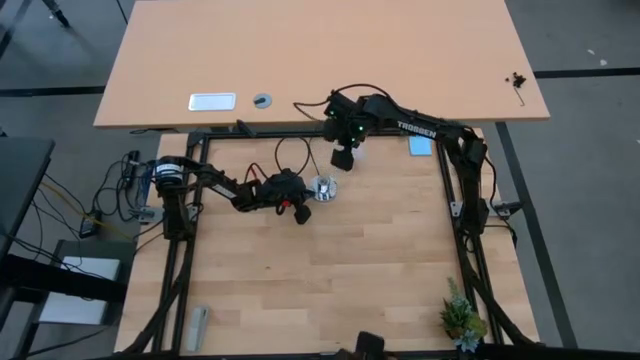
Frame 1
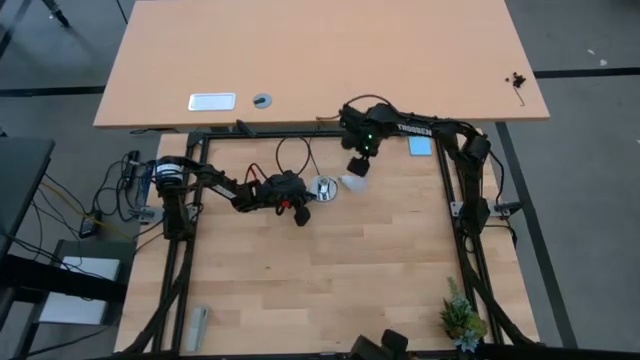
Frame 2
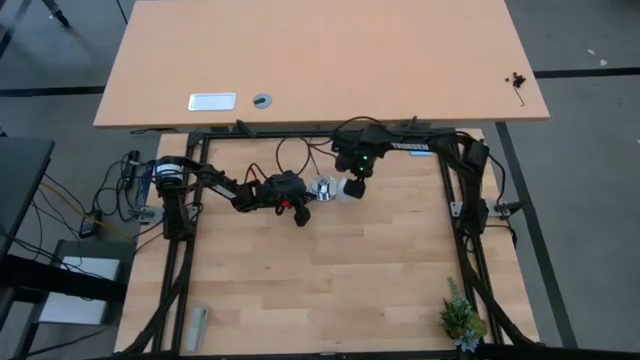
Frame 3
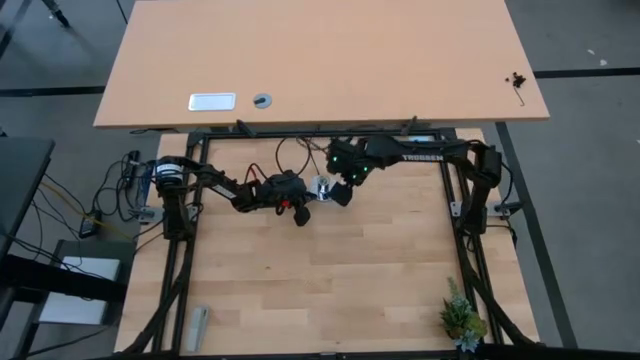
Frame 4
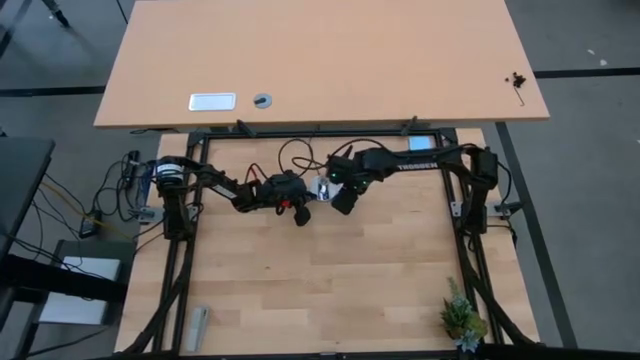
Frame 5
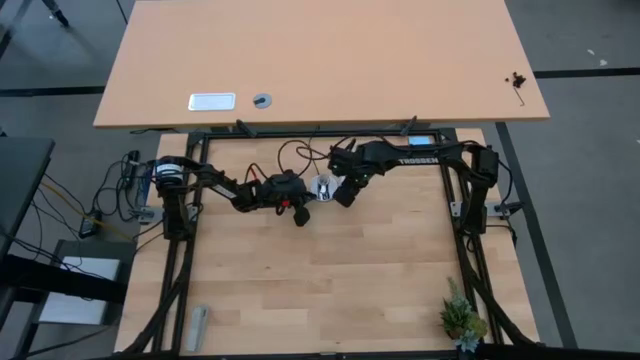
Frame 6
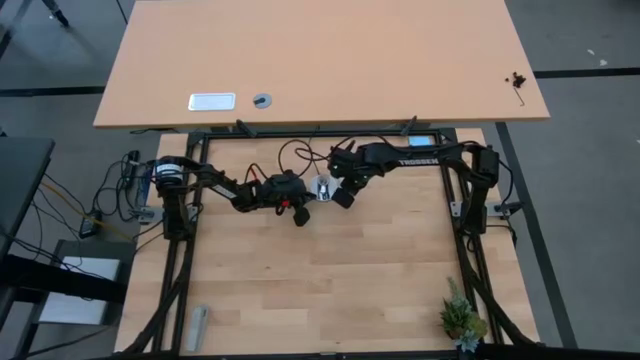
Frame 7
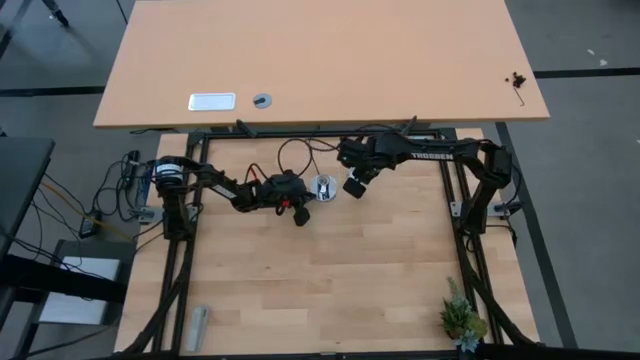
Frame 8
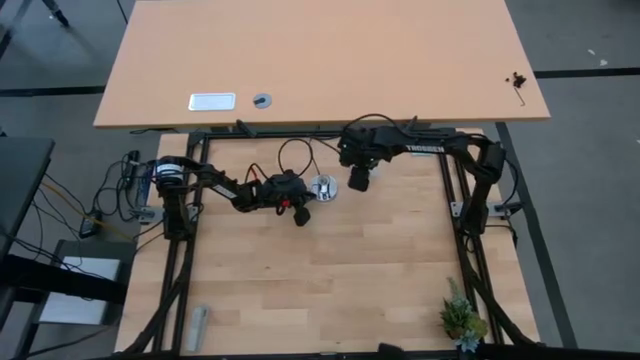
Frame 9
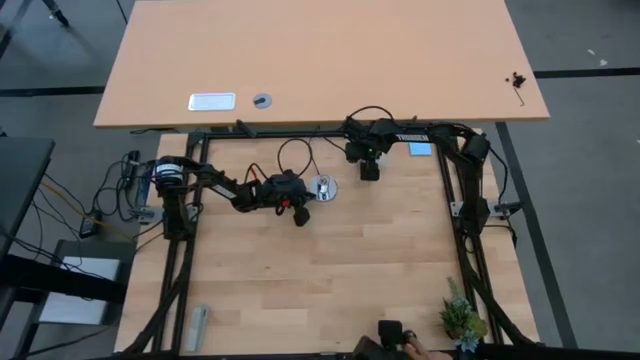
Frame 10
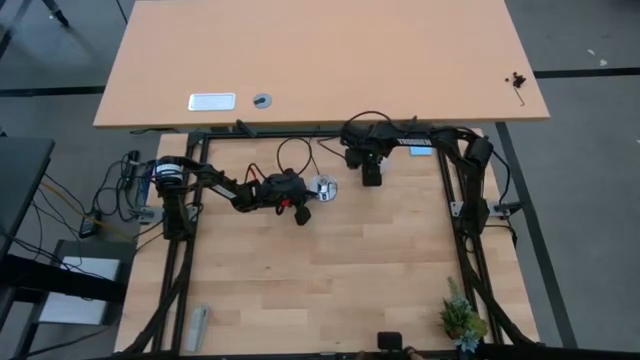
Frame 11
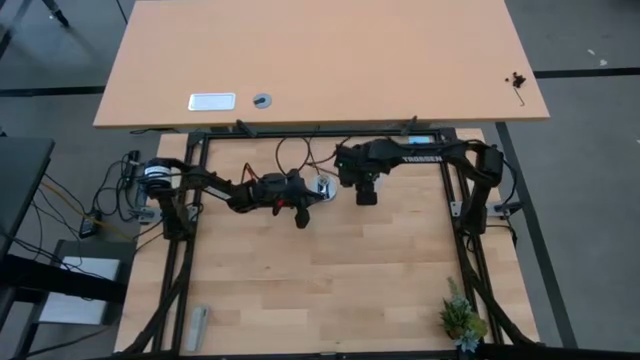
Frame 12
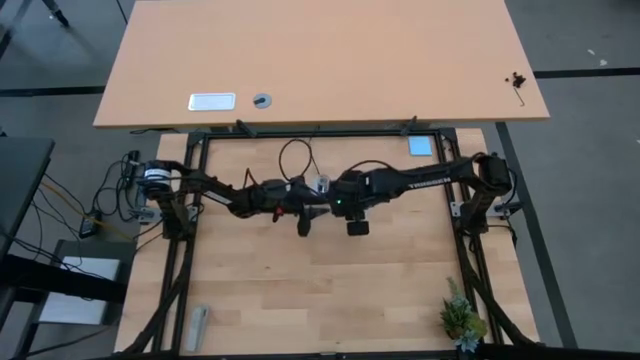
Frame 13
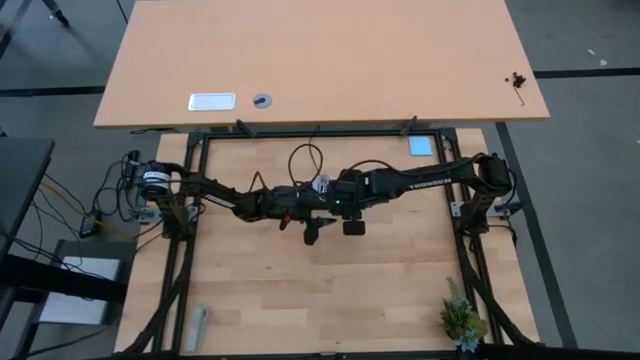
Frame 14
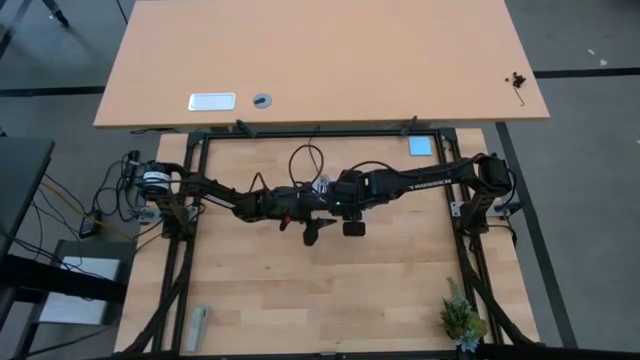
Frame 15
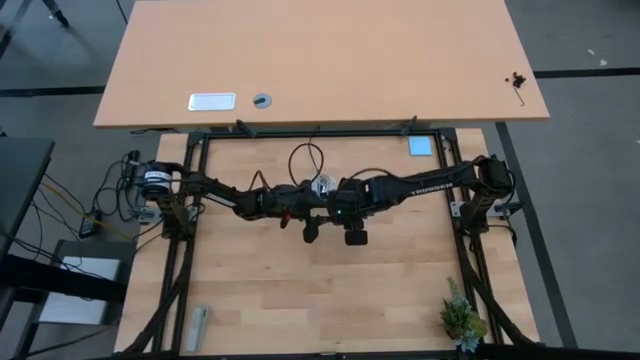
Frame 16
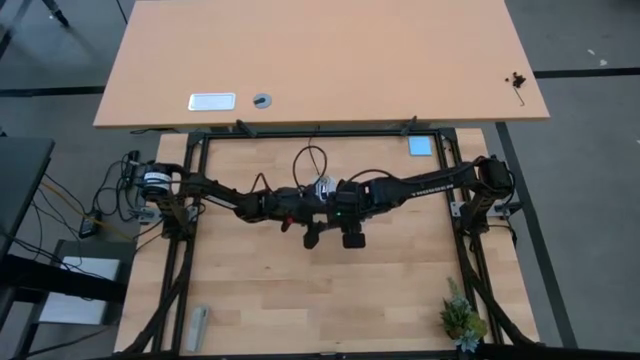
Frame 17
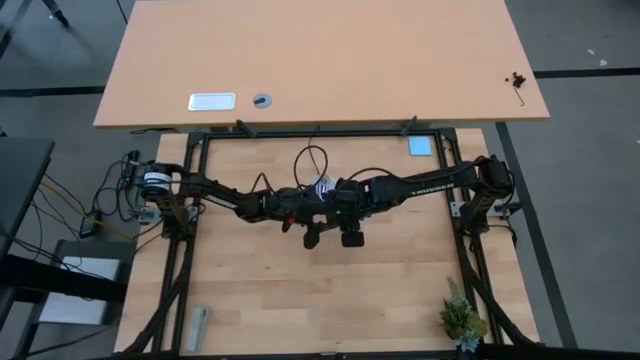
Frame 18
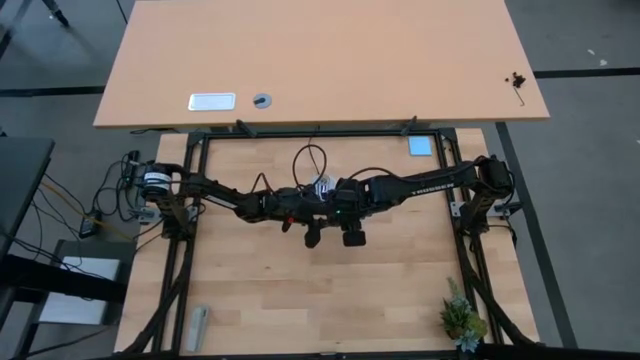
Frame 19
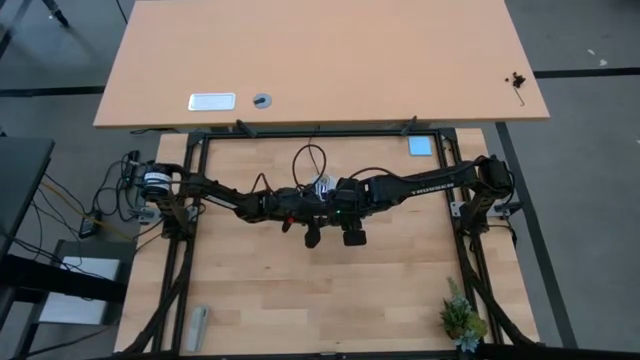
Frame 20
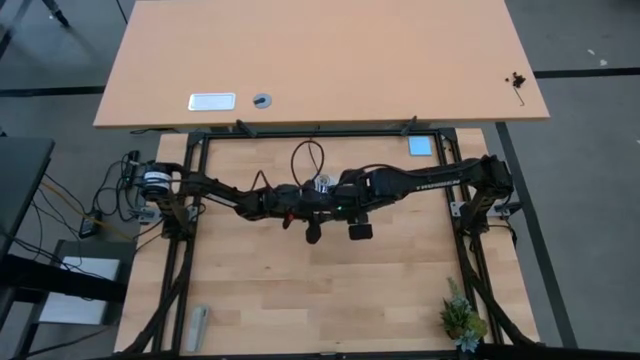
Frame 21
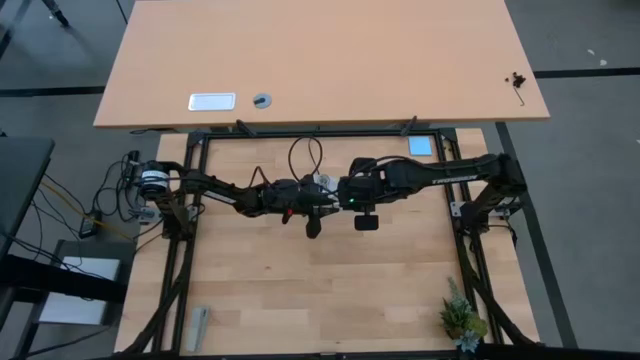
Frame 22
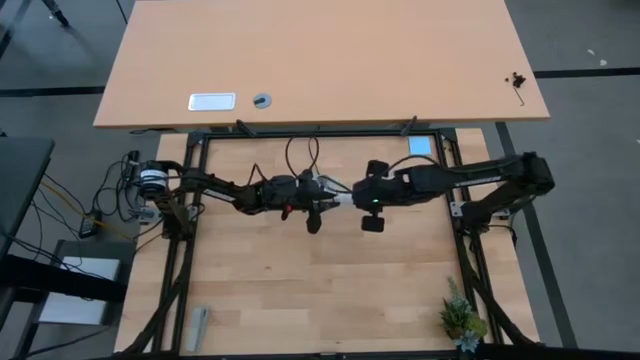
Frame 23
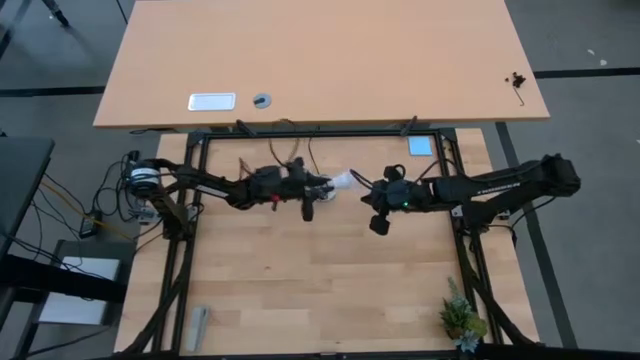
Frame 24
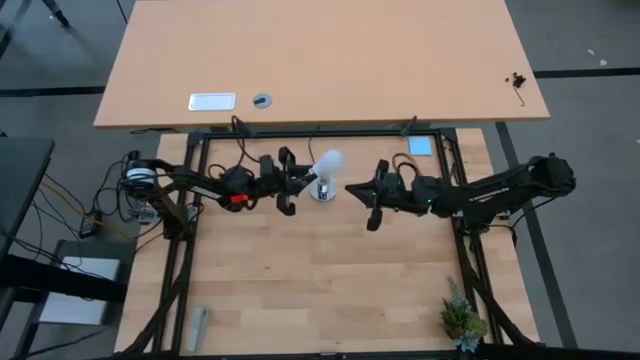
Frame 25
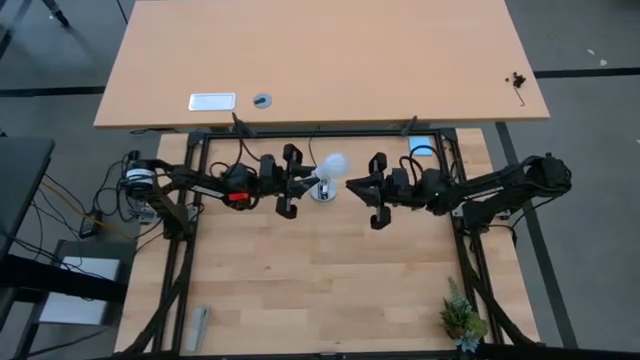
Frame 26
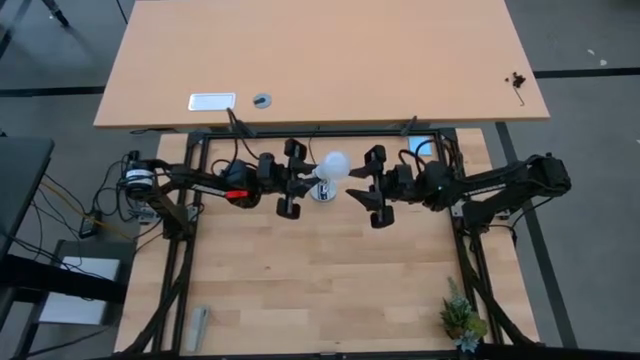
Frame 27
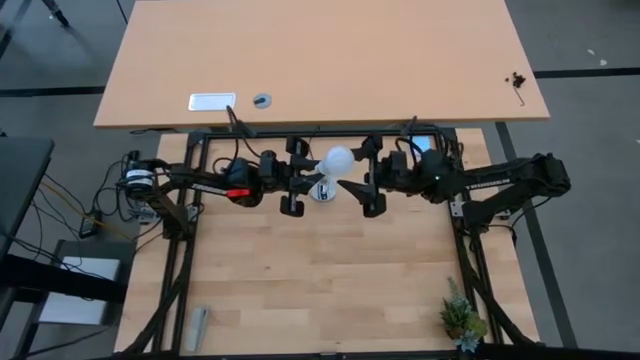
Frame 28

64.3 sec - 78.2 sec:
Task: Screw lightbulb
Insert the lightbulb into the lamp

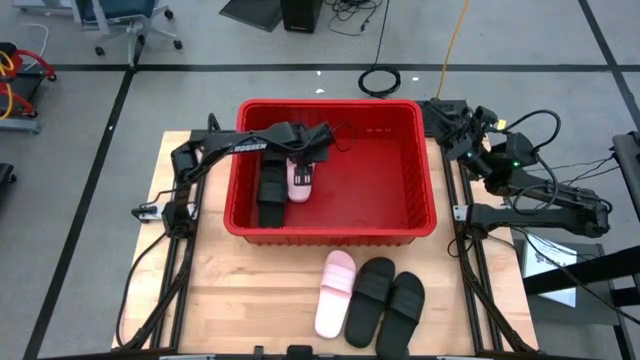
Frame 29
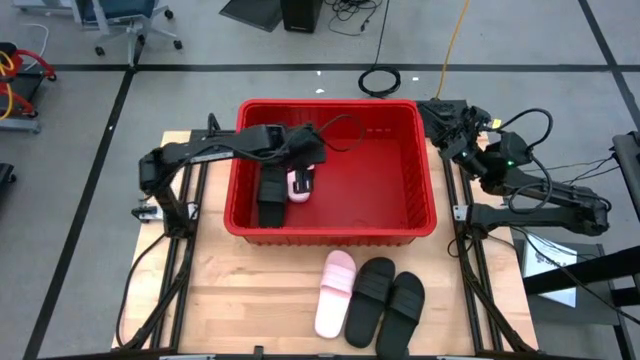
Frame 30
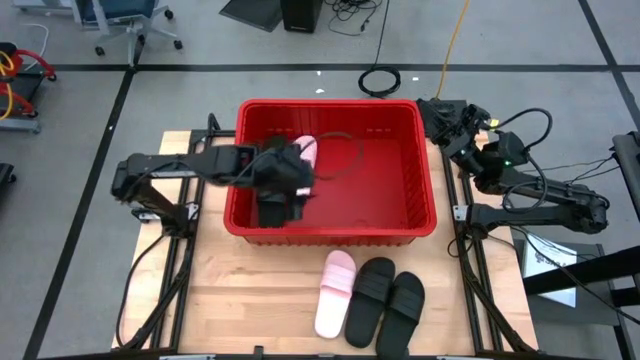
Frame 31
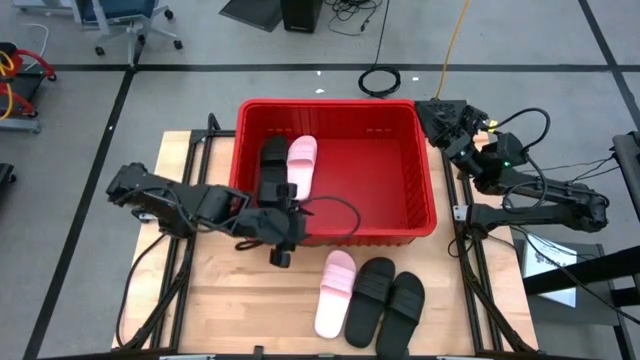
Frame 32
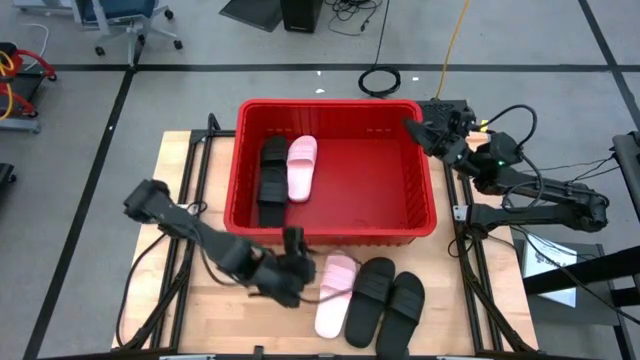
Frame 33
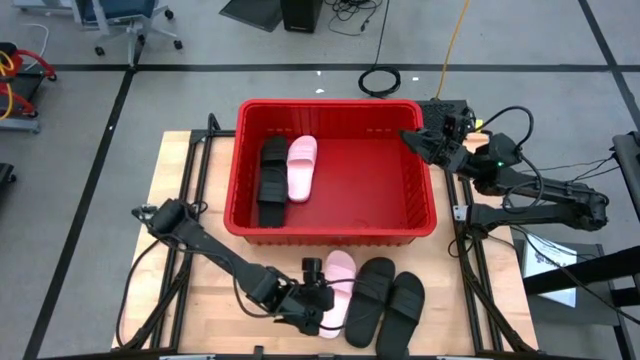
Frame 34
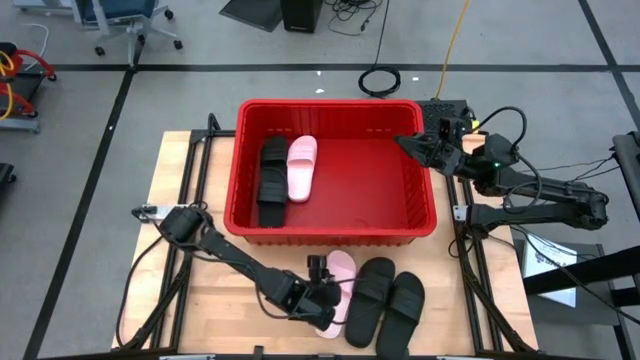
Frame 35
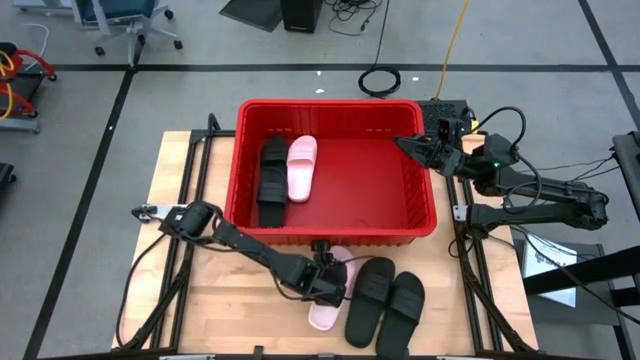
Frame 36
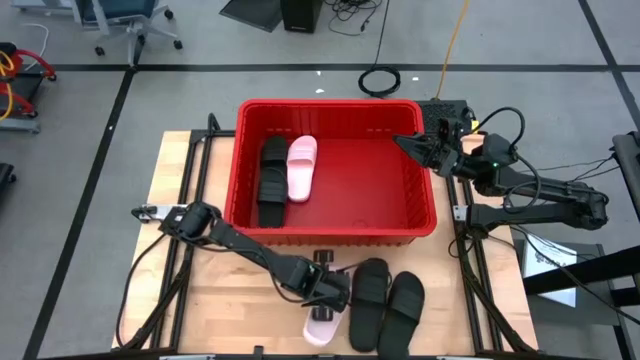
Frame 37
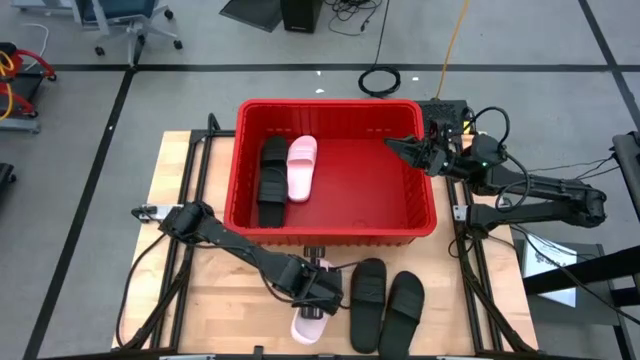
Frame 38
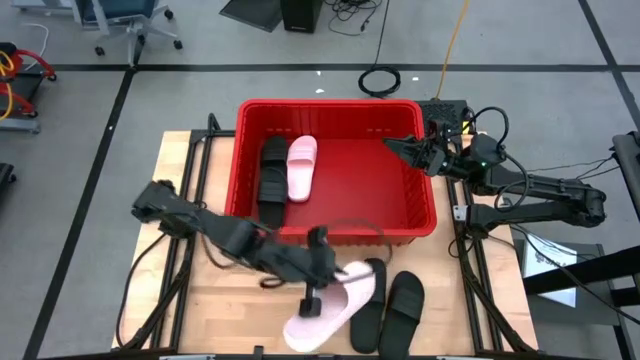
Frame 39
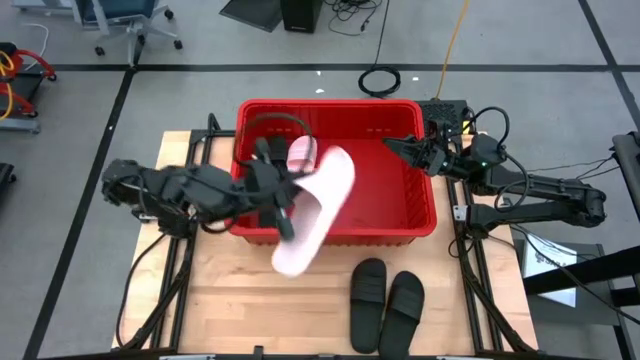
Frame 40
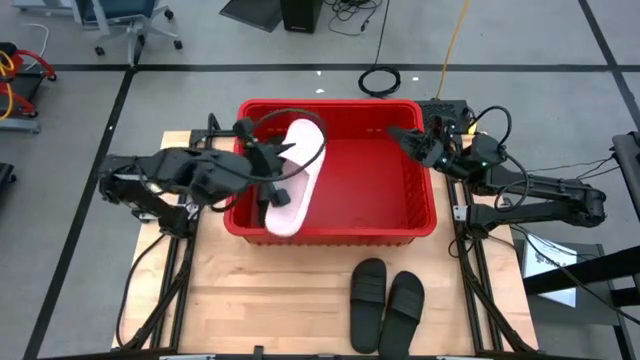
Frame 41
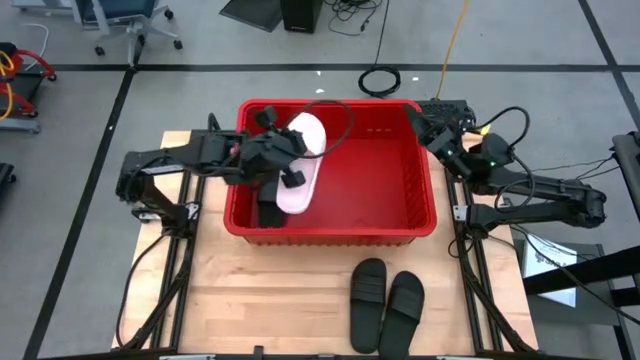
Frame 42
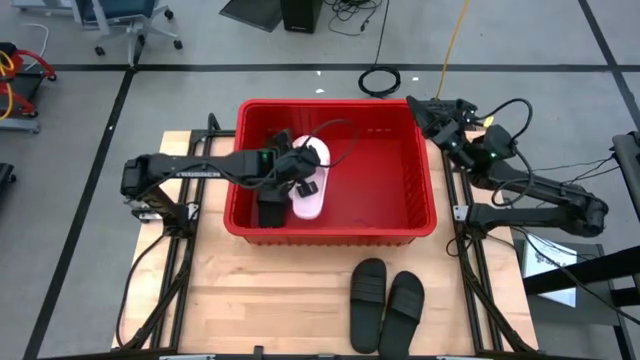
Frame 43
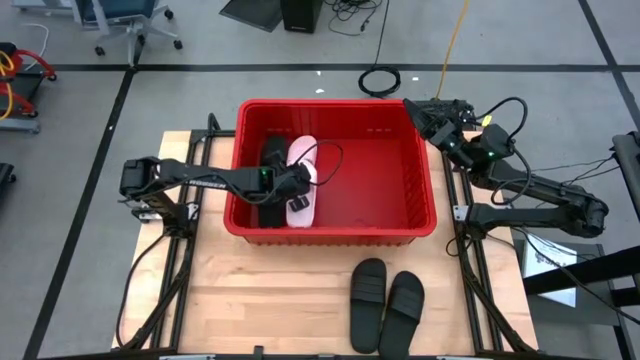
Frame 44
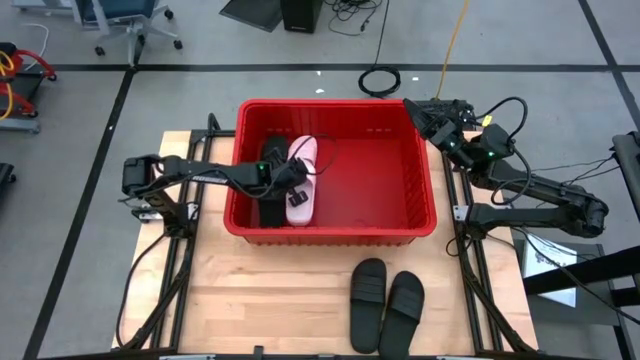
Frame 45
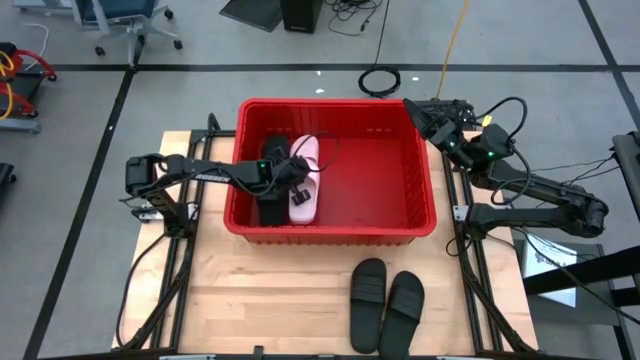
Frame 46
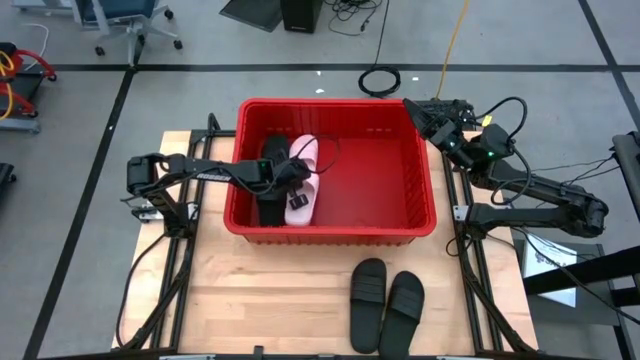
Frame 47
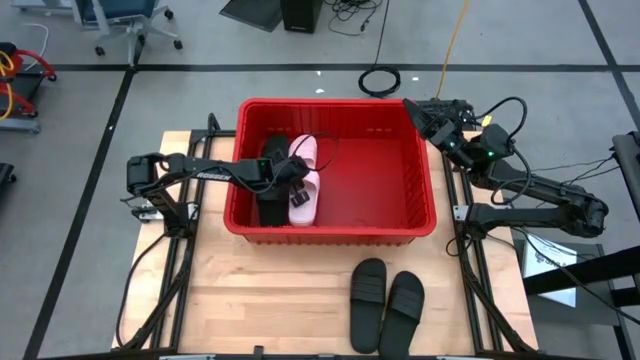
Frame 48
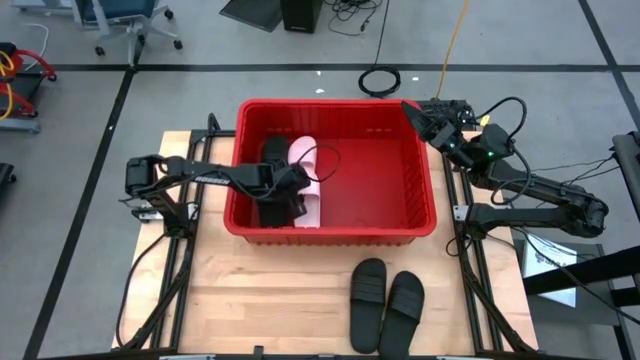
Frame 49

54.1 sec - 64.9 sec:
Task: Pick and place slides into bin
Put the pink slide into the red bin
